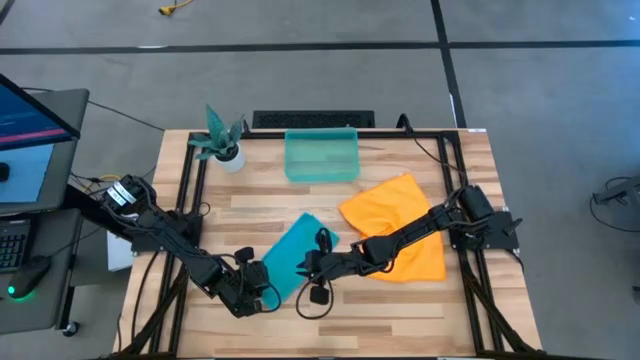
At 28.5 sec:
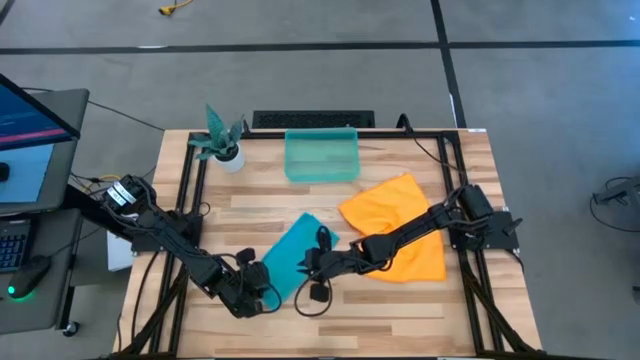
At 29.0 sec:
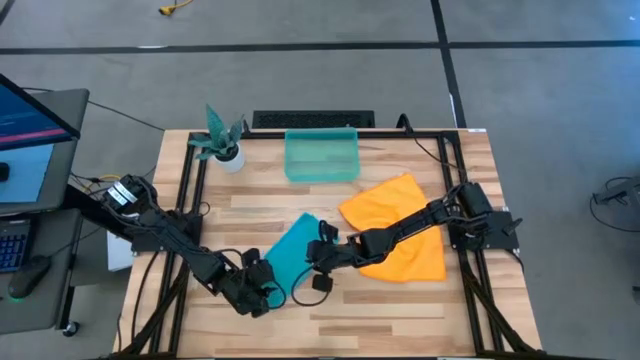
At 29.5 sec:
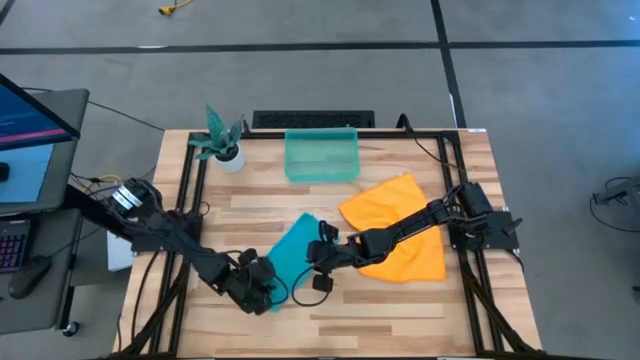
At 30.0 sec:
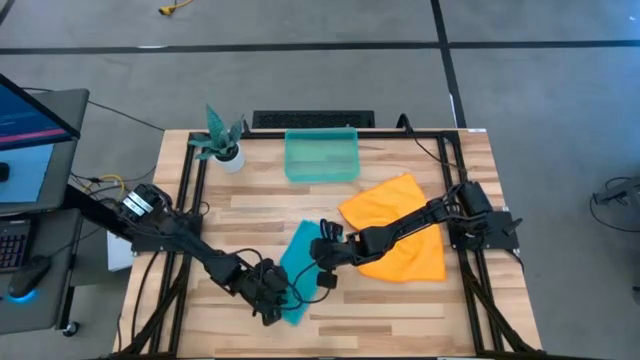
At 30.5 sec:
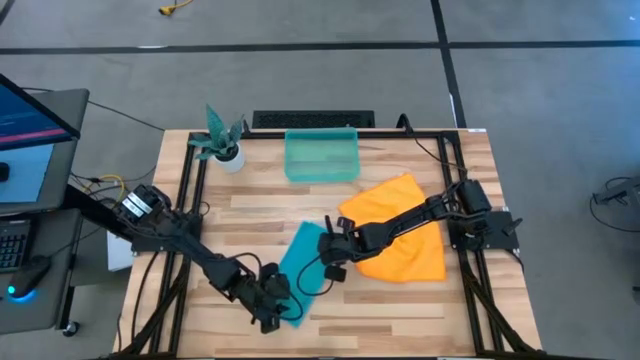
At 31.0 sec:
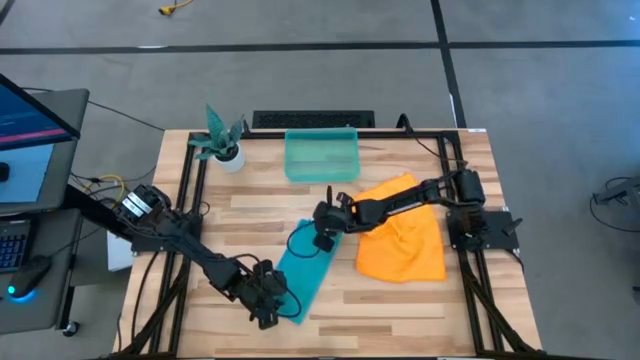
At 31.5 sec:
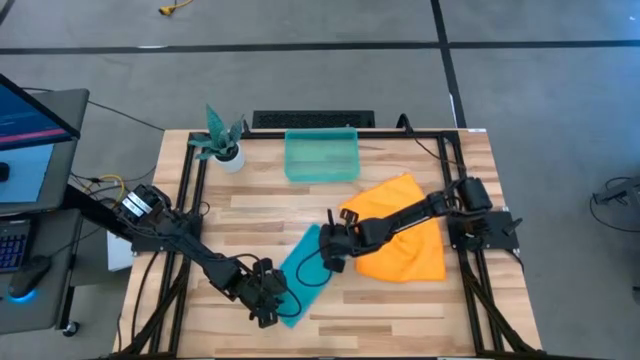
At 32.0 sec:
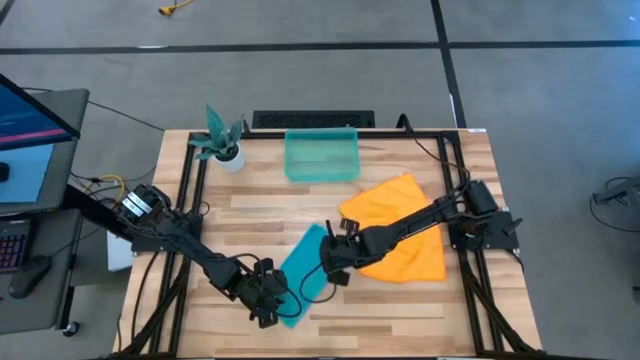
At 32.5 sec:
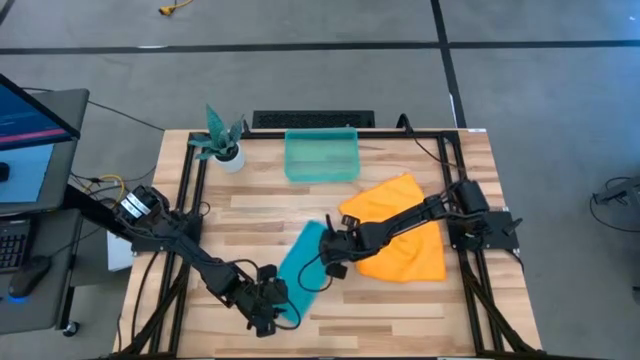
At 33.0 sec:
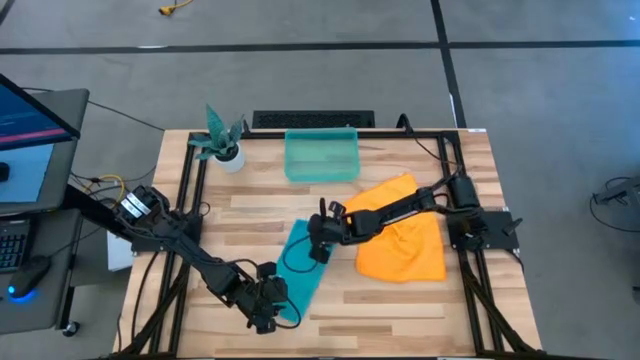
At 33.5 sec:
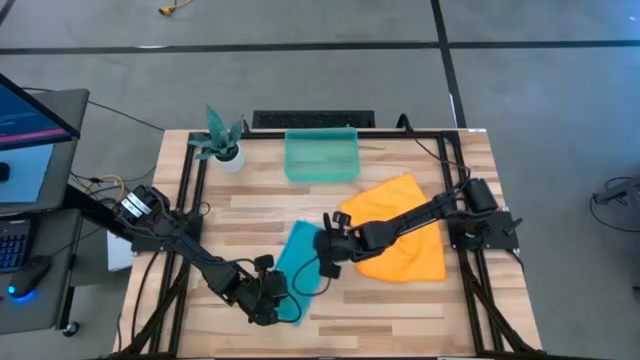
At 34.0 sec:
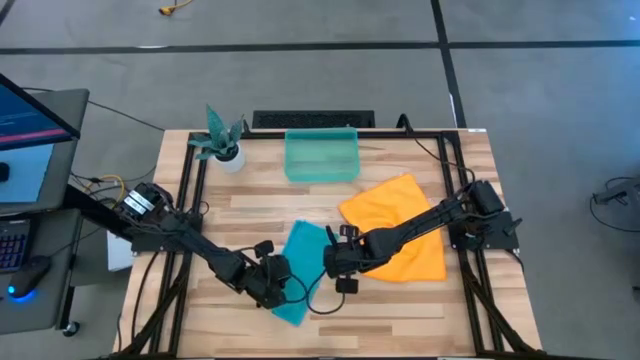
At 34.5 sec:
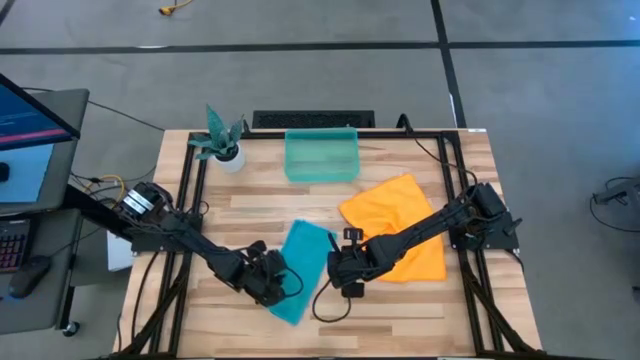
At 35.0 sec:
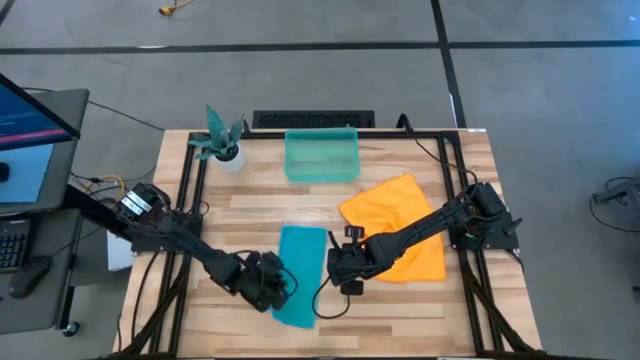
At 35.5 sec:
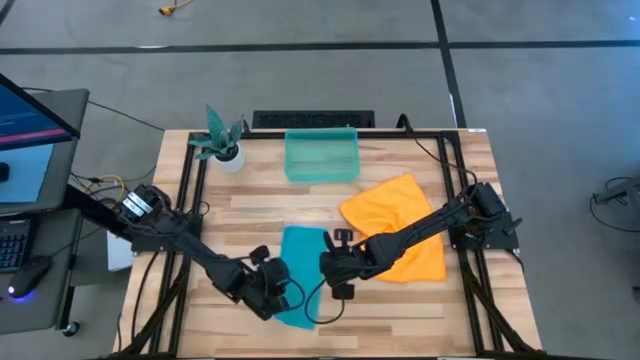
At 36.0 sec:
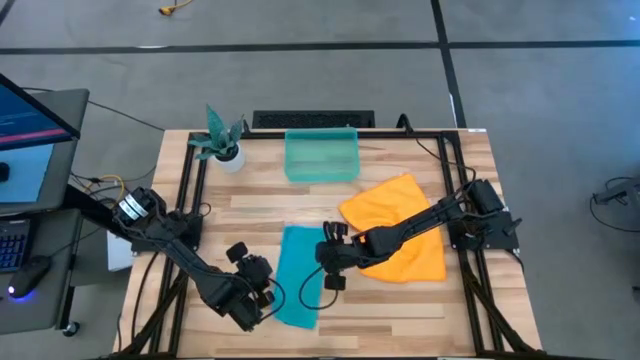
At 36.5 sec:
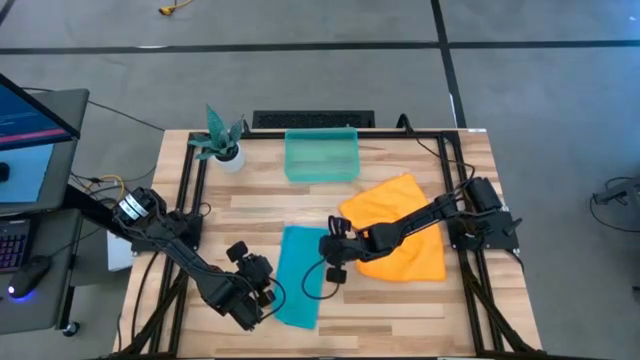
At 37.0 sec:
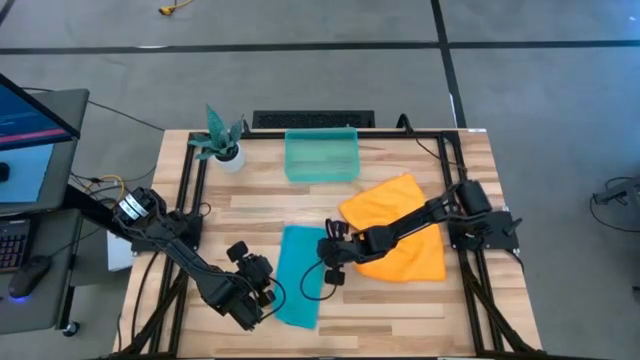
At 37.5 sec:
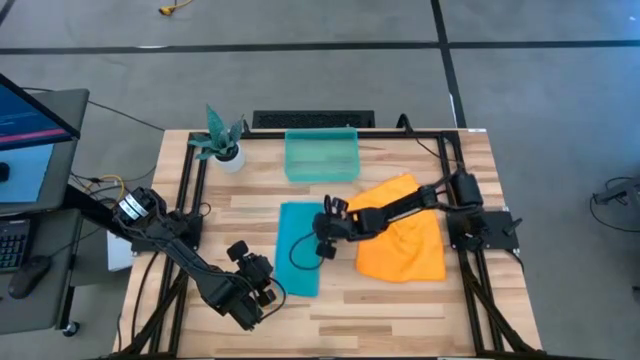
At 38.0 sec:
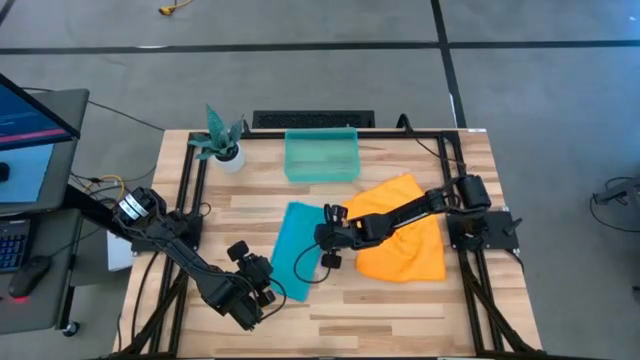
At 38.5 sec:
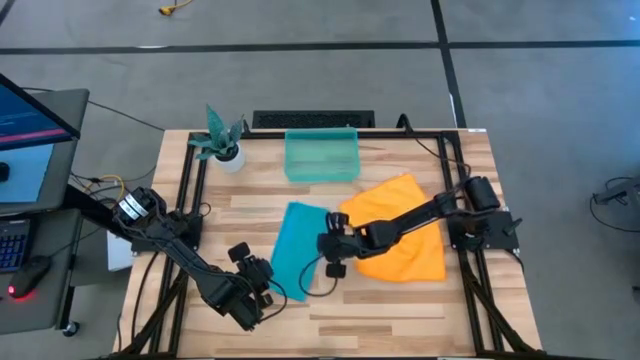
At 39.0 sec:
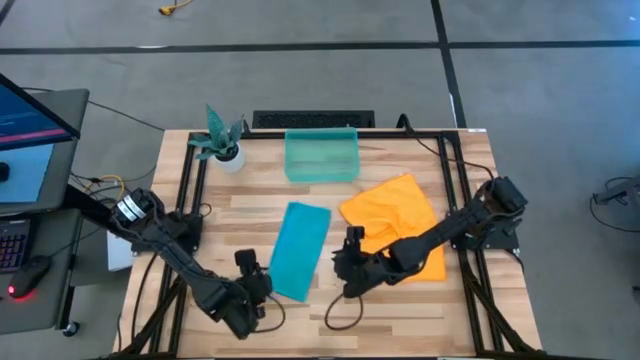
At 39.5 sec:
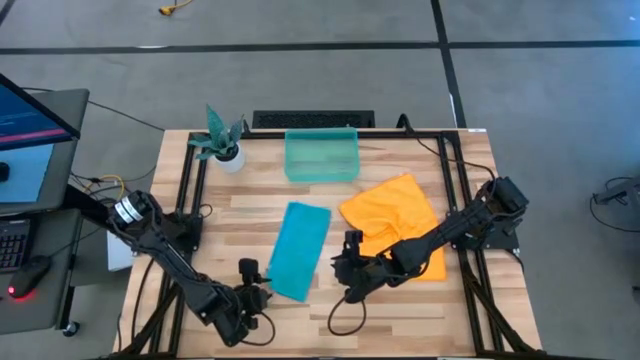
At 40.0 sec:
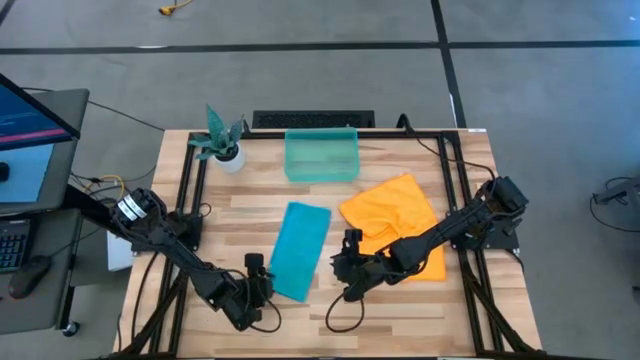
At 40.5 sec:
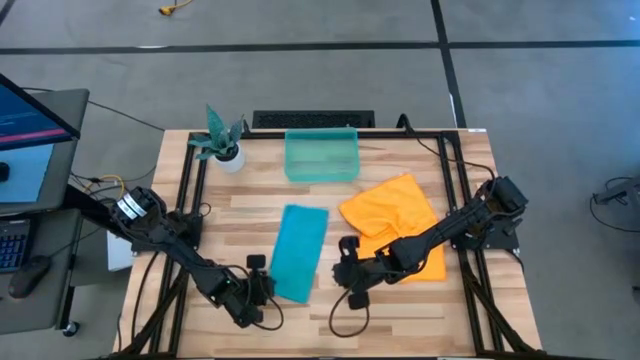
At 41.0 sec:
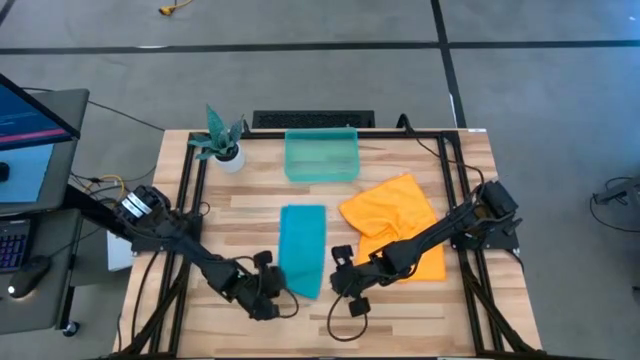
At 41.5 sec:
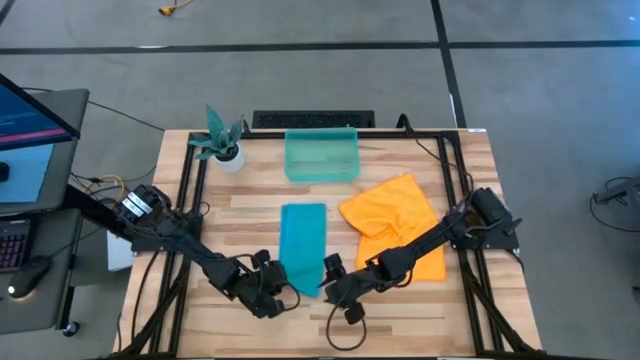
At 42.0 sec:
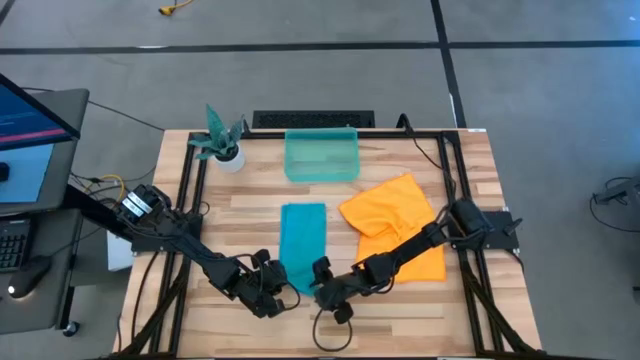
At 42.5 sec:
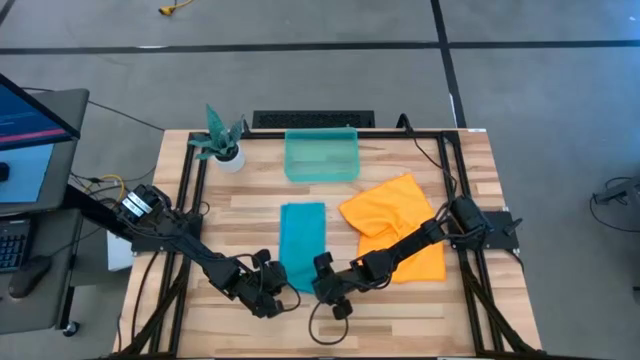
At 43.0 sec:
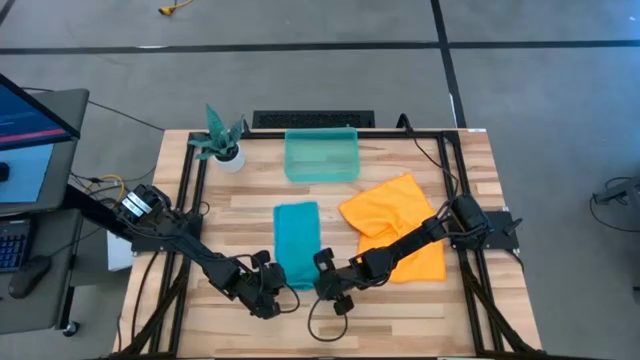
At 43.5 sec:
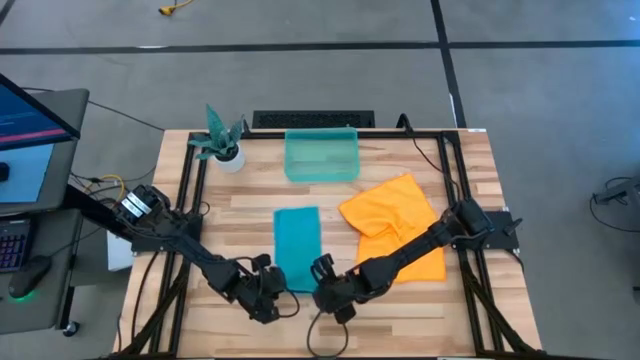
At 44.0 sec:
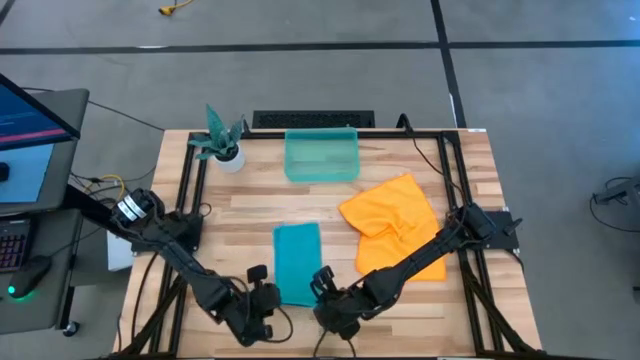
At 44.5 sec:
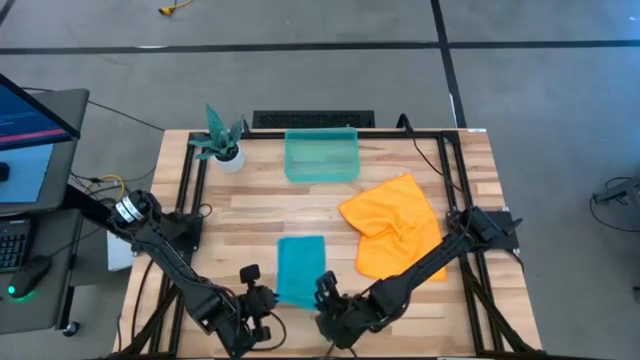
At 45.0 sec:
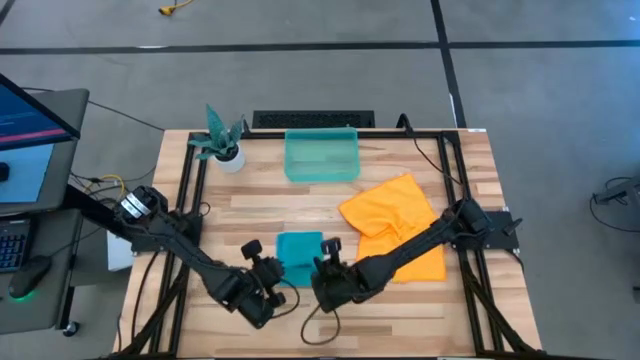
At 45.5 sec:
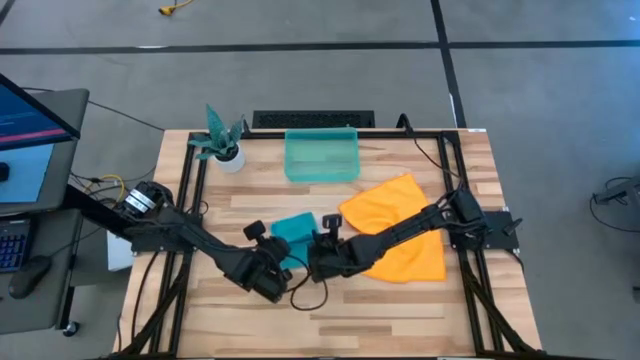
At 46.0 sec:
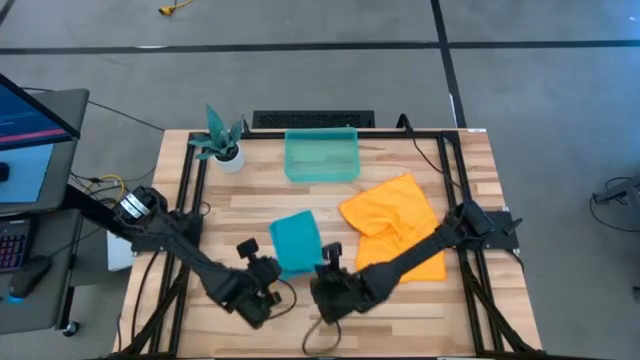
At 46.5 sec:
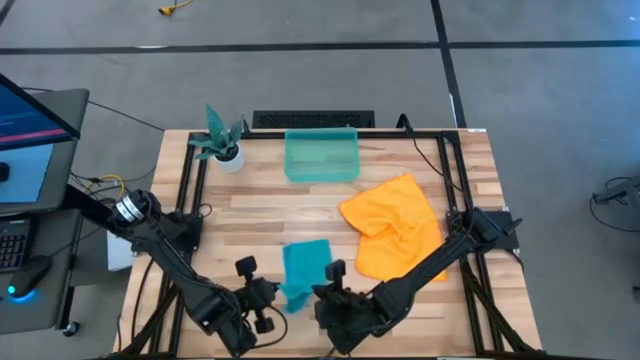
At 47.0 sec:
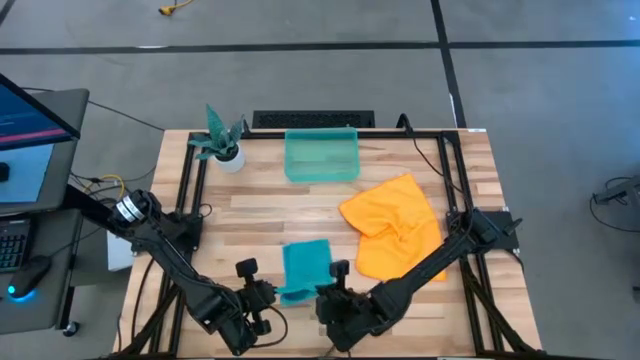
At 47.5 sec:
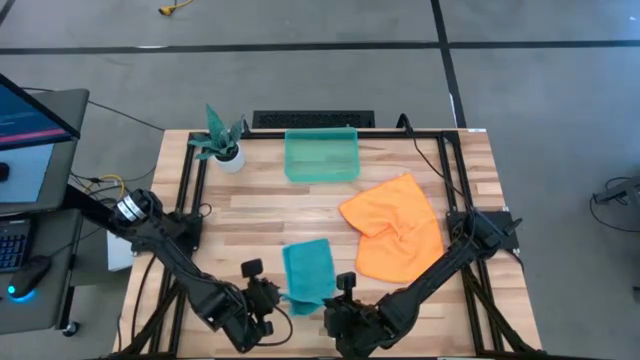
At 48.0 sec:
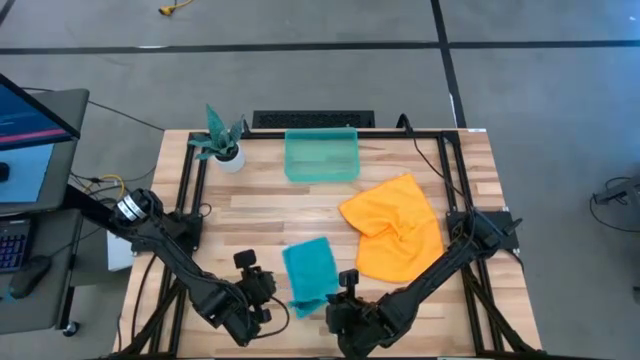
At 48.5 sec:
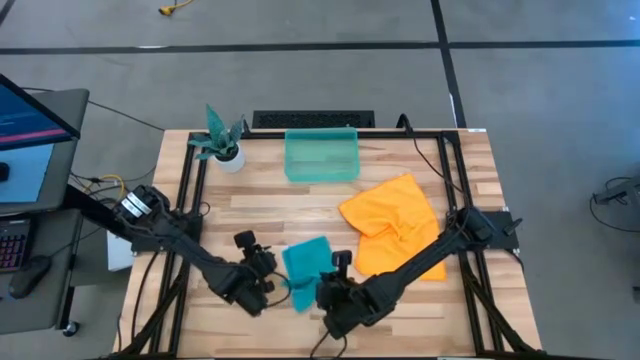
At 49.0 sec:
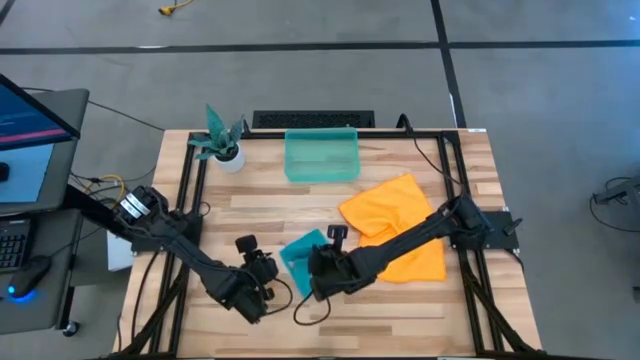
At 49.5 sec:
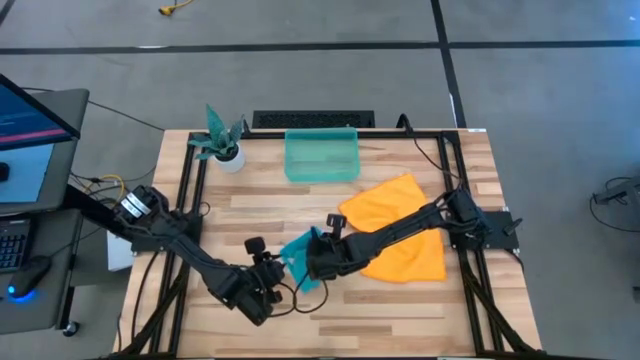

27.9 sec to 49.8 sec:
Task: Roll microfiber towels into tight, uniform cylinder then place into a basket
Roll the blue microfiber cloth
